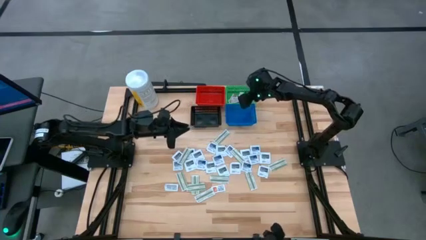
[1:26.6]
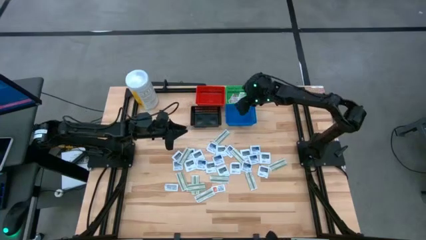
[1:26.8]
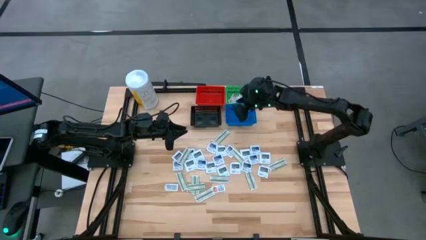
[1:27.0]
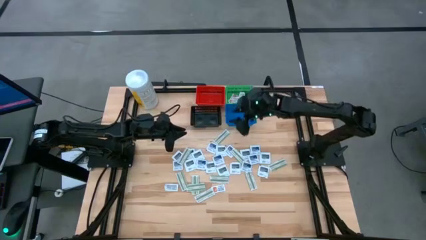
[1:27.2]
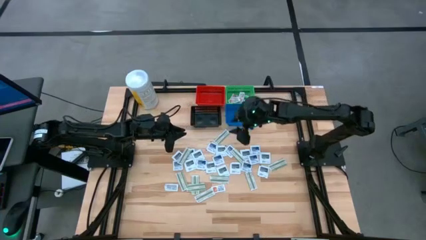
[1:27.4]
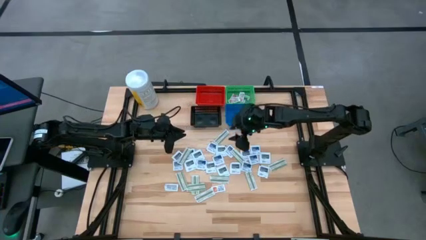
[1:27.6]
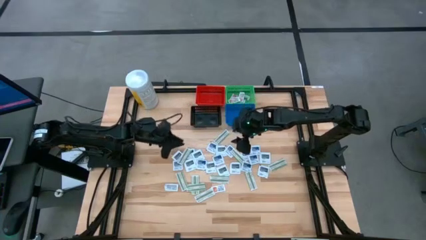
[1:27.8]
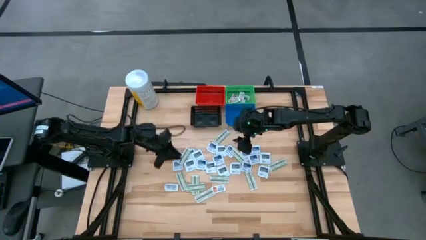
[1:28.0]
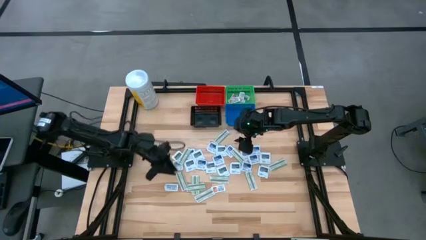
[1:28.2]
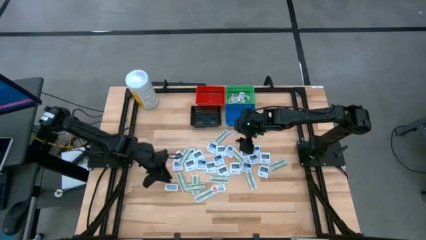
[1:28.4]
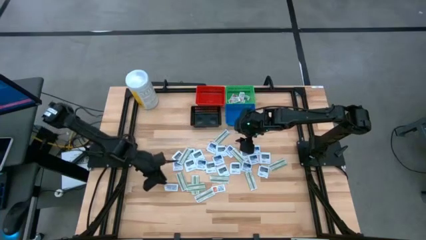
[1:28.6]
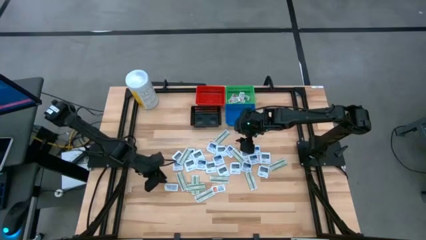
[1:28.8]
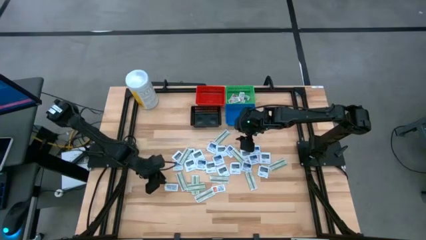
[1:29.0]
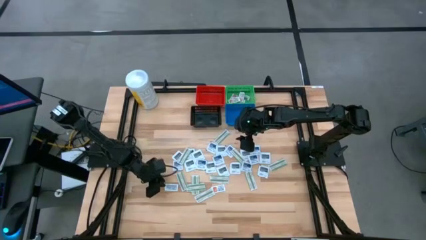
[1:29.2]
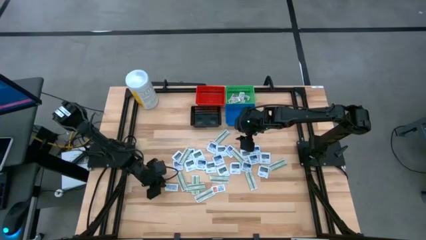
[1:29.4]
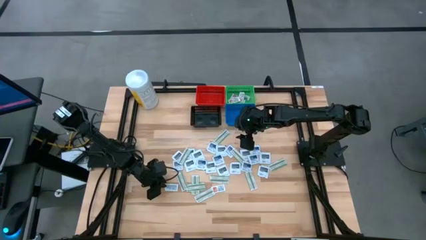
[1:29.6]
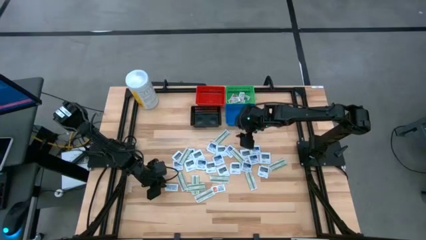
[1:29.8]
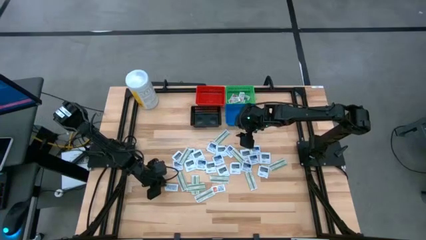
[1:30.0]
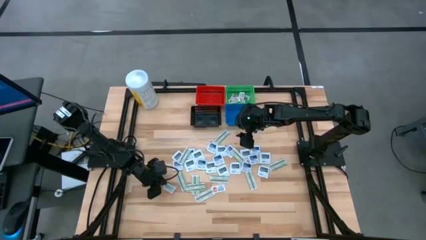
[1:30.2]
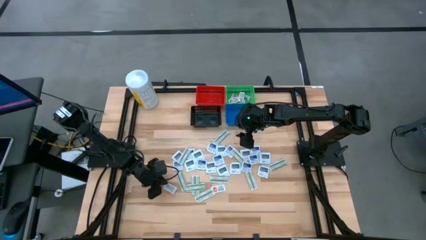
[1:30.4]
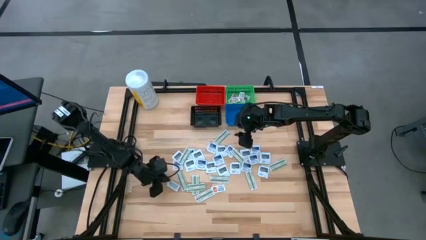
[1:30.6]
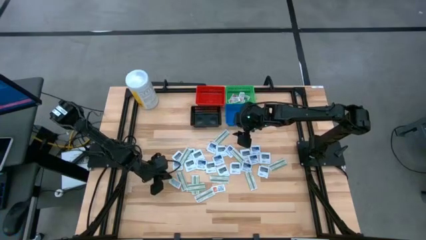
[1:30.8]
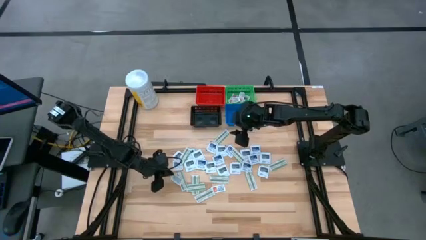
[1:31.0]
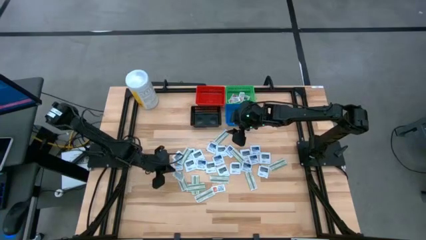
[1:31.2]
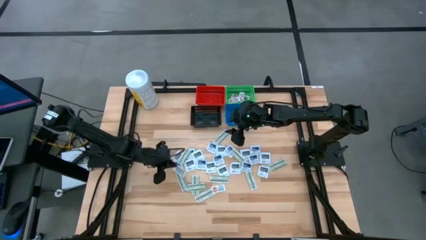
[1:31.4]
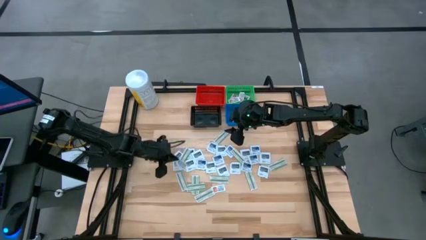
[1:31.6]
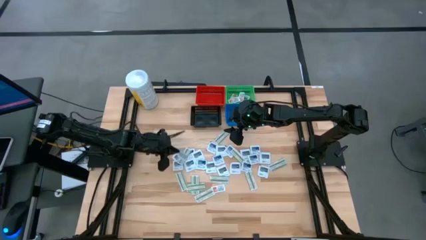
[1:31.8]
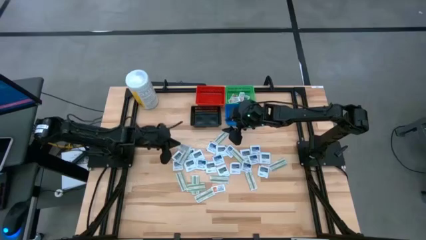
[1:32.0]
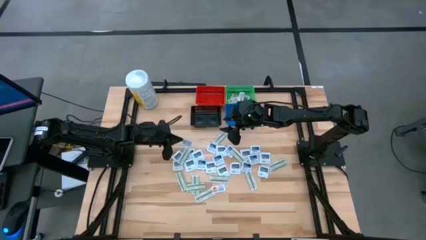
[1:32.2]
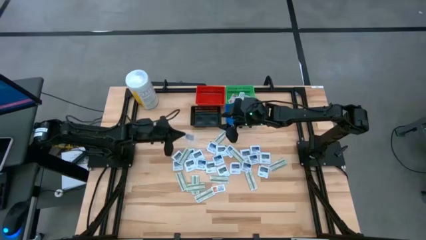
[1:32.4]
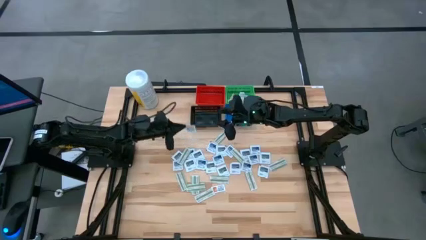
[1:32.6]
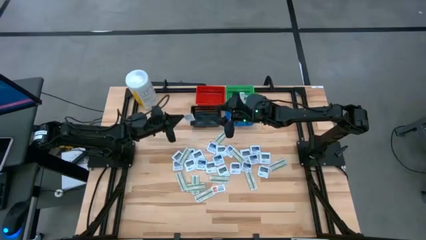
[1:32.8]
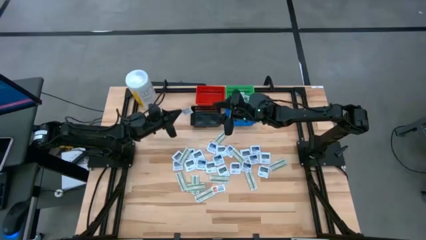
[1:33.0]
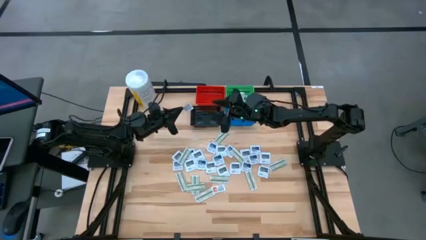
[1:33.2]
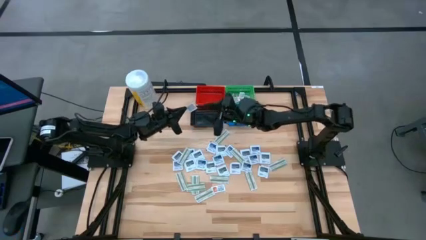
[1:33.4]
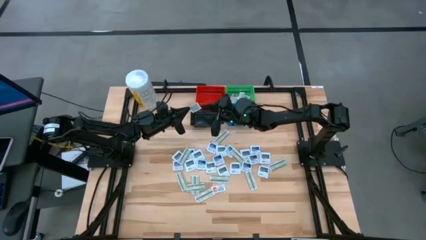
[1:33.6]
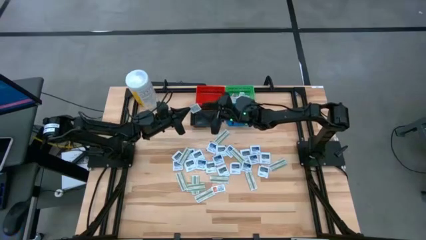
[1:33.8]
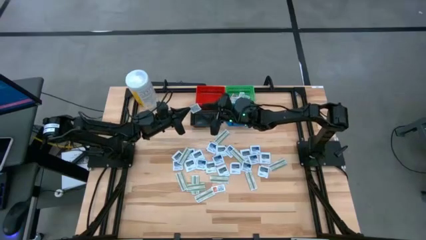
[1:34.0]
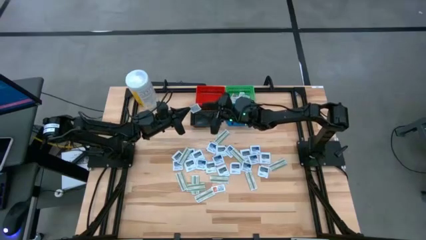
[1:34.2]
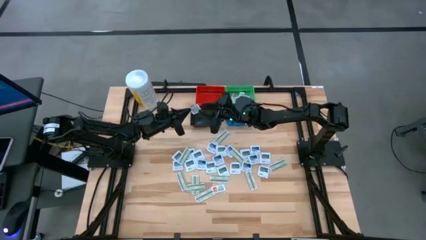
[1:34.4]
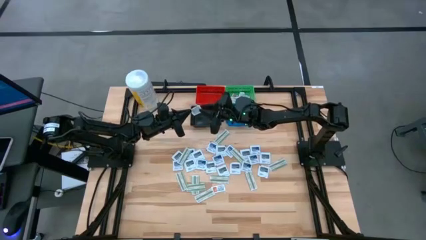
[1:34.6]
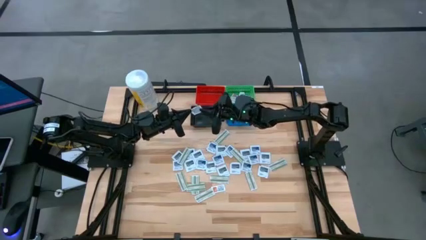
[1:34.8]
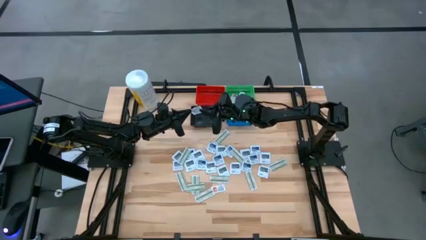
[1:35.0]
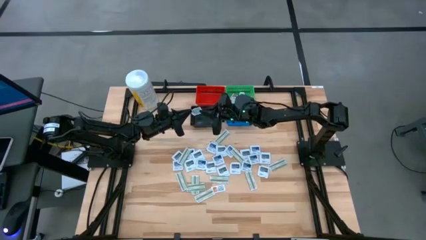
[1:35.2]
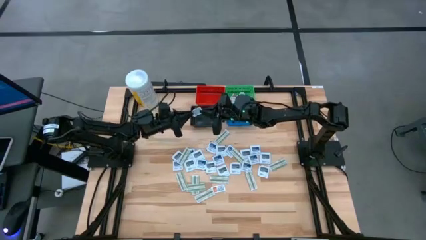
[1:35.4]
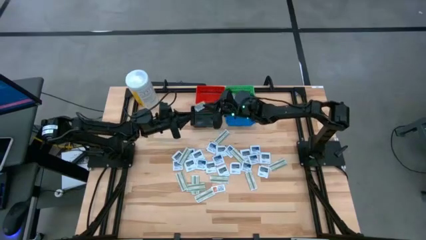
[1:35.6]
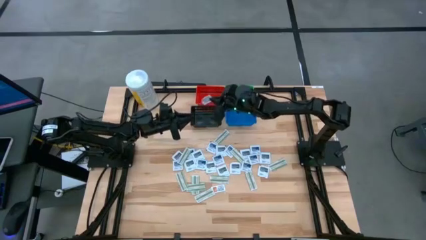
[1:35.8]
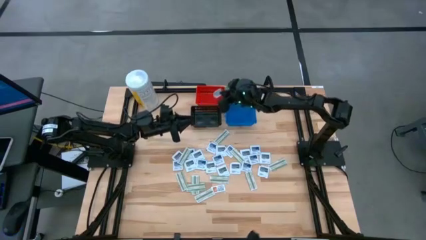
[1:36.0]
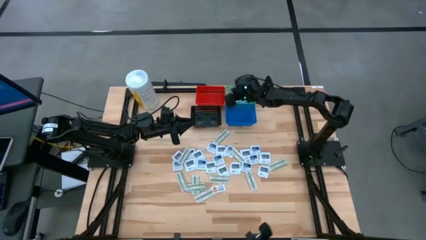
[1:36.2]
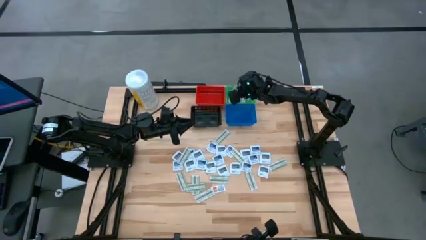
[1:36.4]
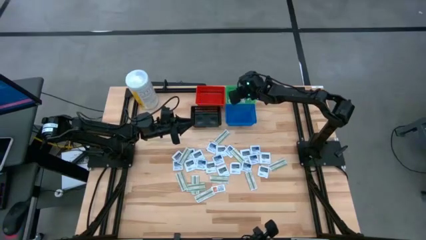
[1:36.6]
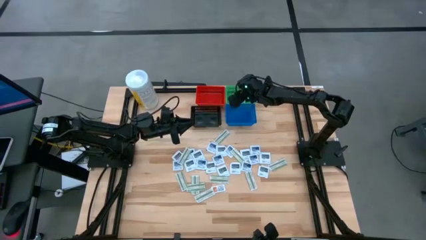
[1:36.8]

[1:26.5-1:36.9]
Task: Pick & Place First Aid Supplies
Put the ointment pack into the green basket

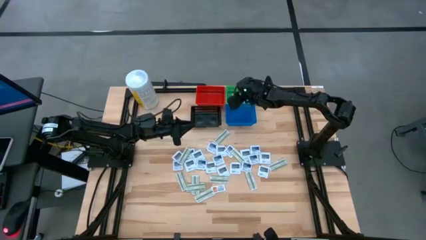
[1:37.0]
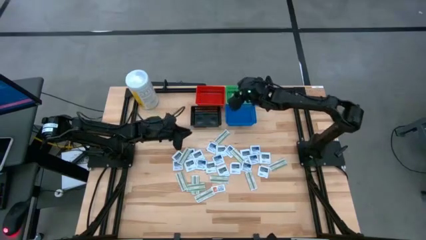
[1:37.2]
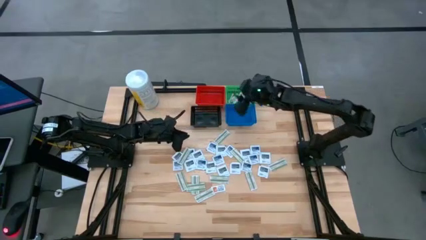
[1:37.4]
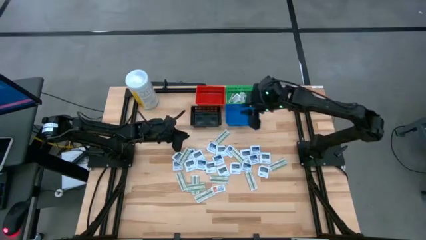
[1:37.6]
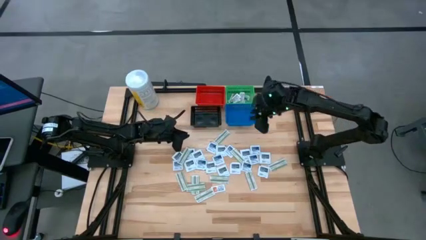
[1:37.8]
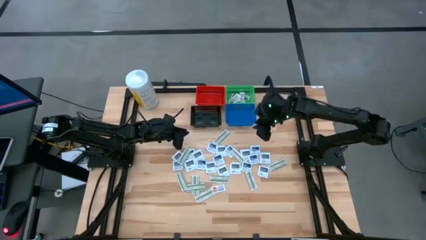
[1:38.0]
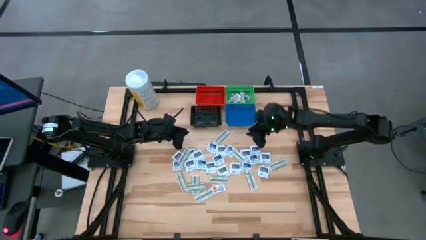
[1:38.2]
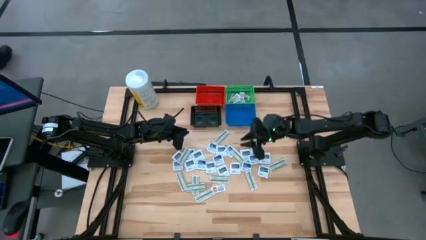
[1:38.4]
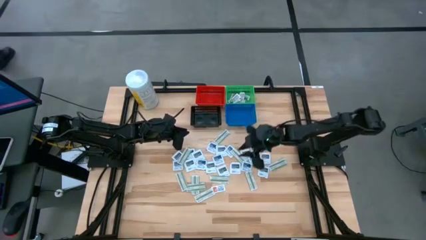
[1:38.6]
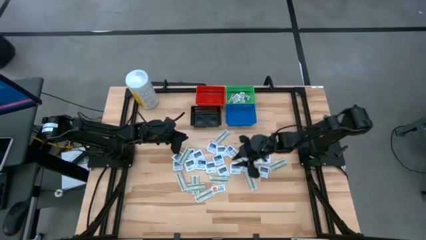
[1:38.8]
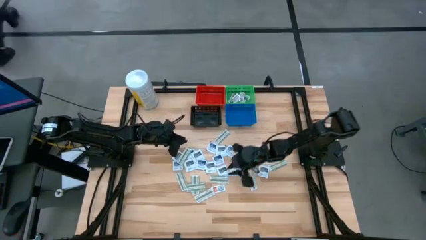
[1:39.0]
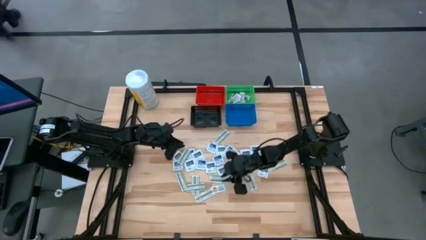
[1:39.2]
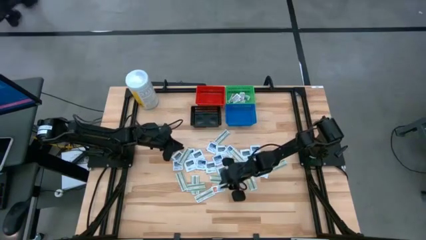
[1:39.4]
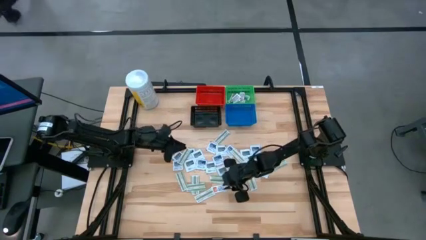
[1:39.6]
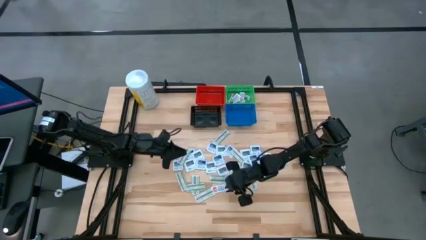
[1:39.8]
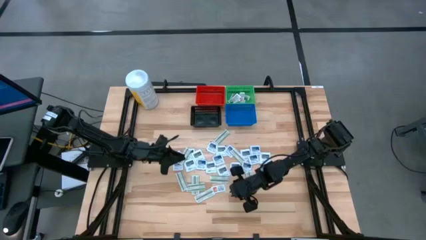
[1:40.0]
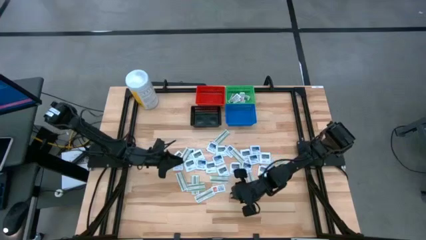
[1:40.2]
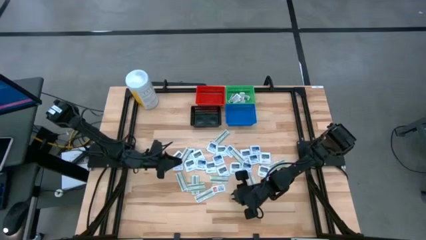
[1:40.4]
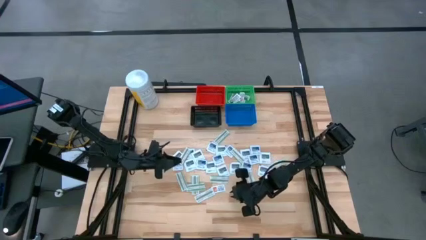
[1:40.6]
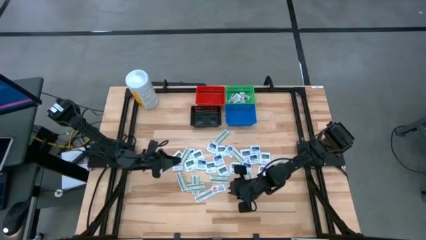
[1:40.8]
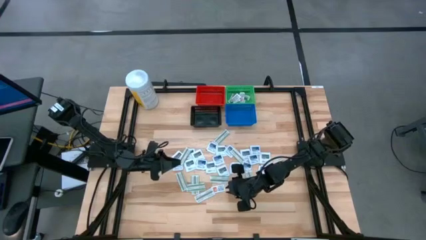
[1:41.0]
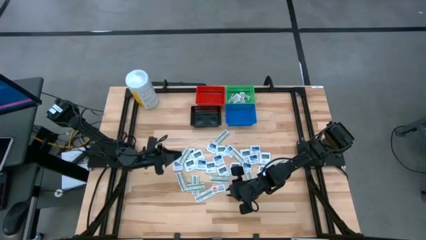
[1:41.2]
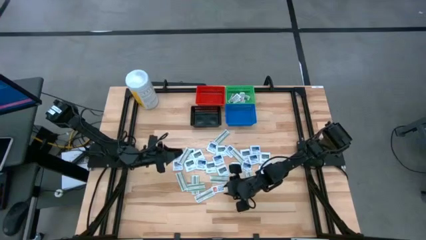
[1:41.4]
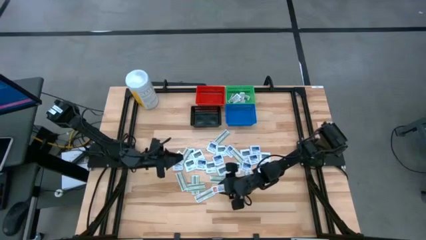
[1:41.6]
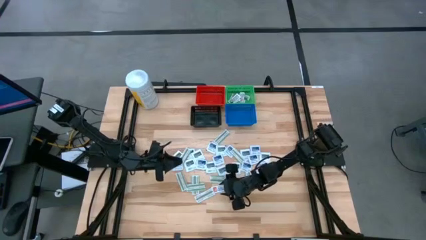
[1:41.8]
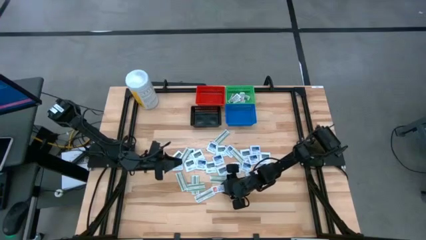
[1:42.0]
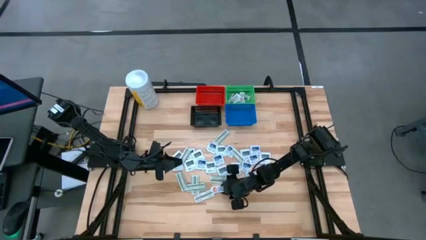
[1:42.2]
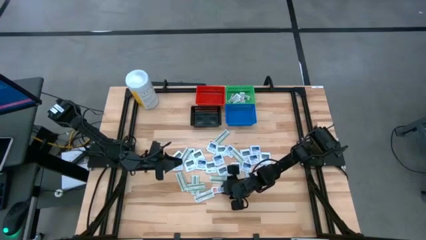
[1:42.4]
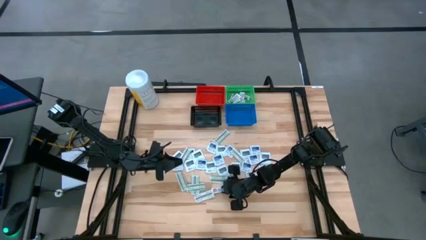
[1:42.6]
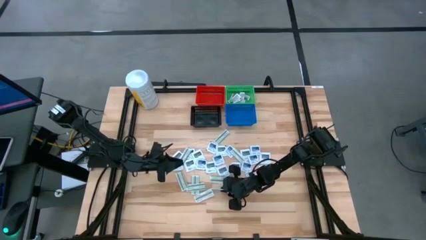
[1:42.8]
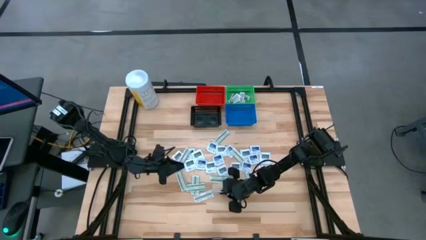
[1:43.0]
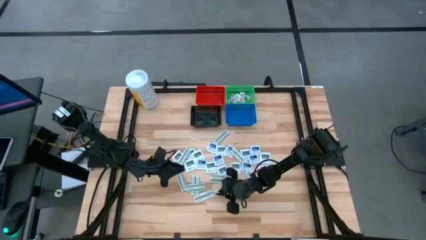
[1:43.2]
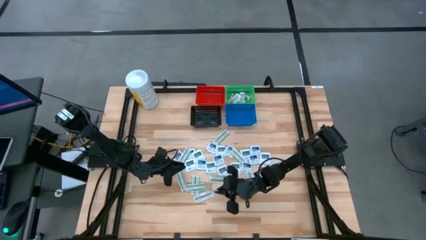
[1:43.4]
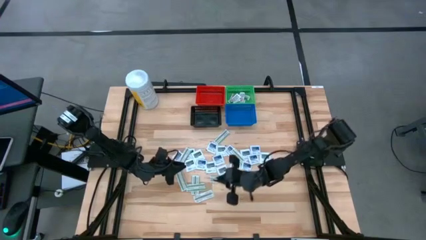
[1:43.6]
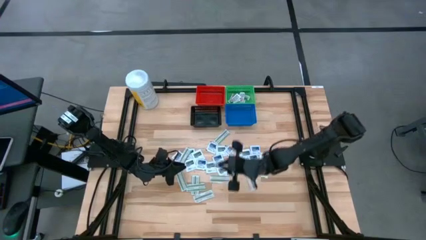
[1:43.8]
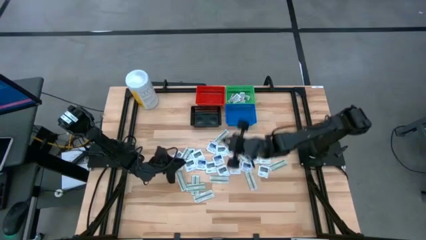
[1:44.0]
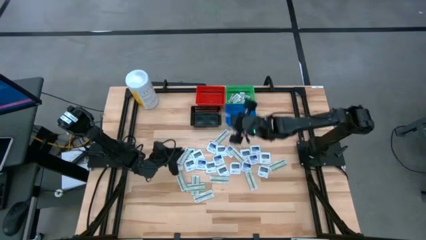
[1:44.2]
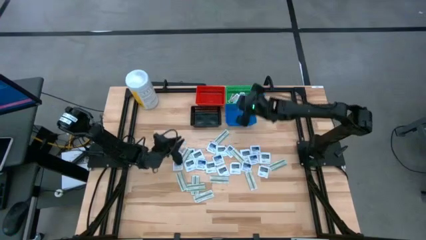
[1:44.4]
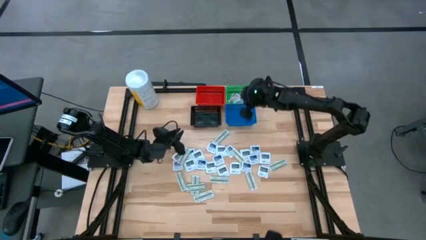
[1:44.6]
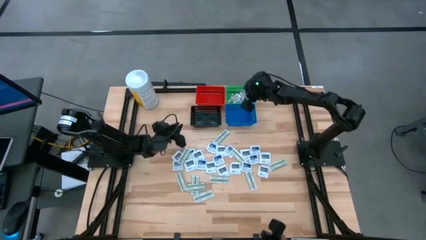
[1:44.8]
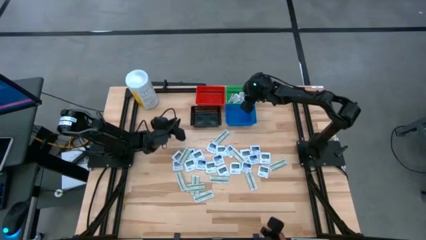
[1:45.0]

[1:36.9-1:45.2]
Put the ointment pack into the green basket
